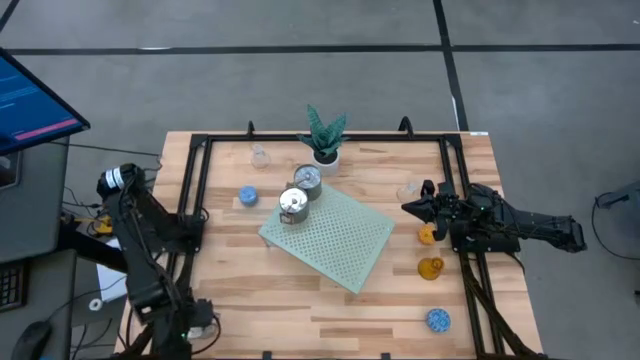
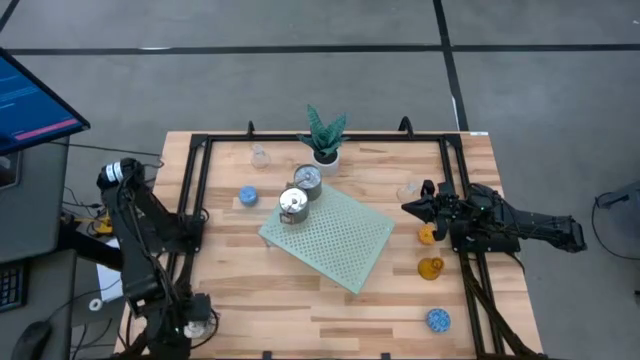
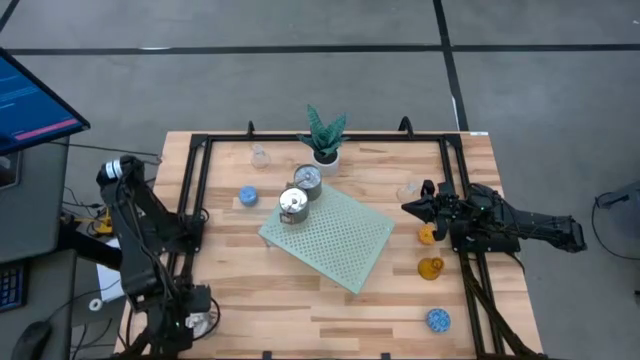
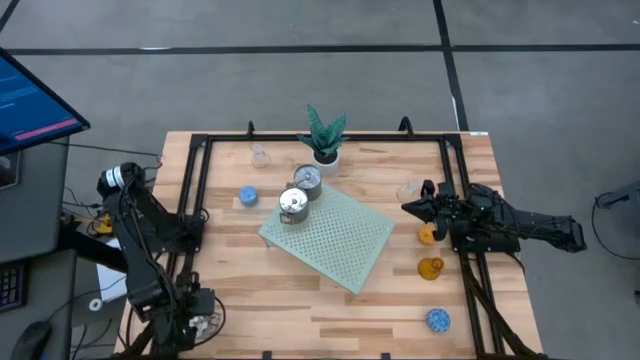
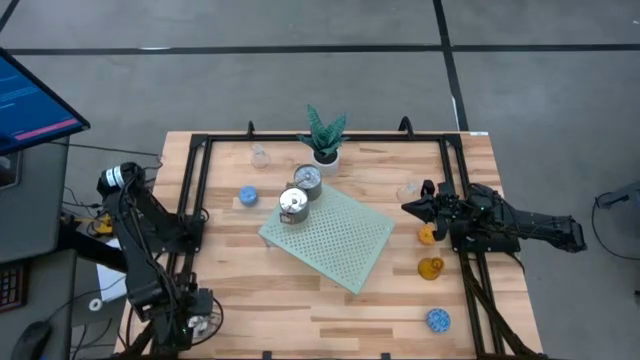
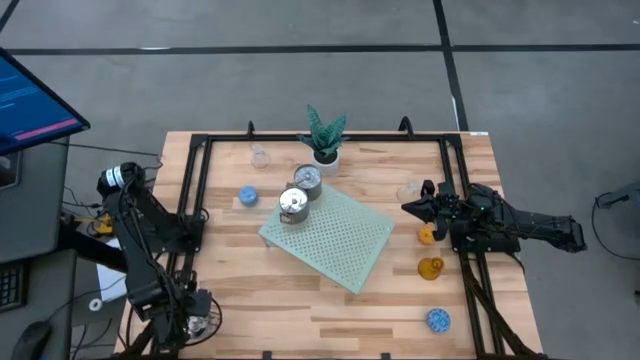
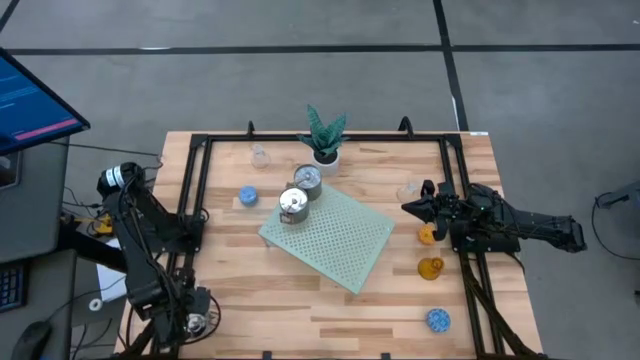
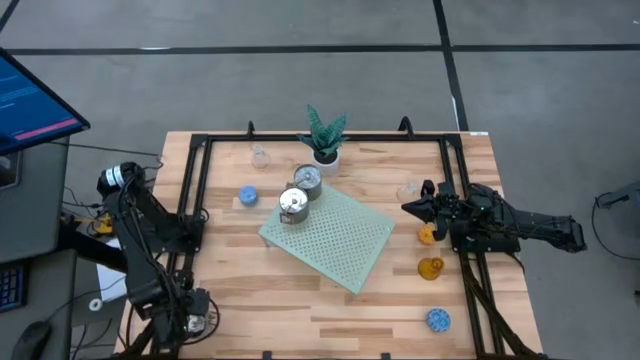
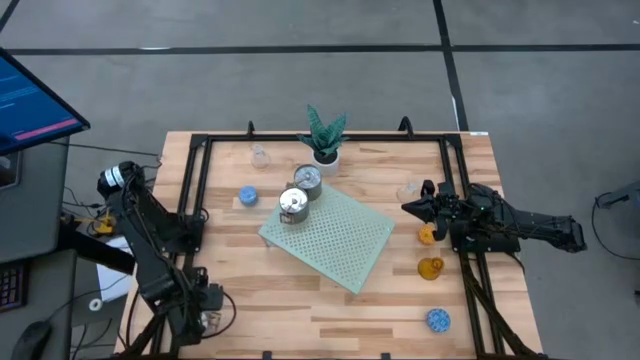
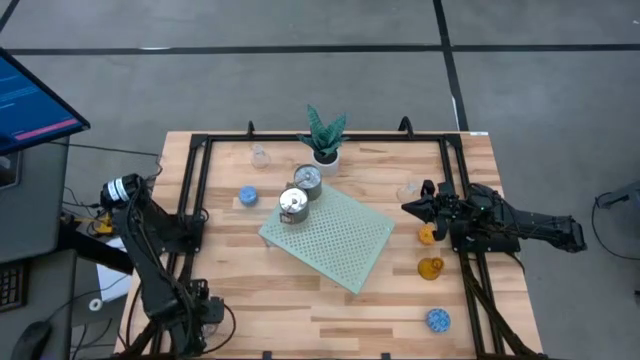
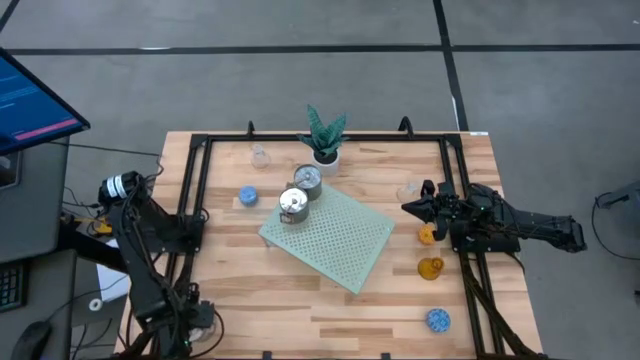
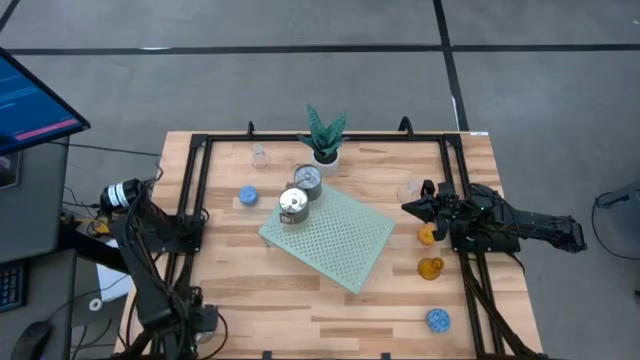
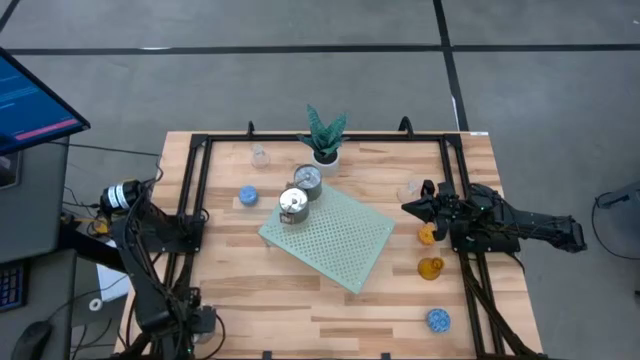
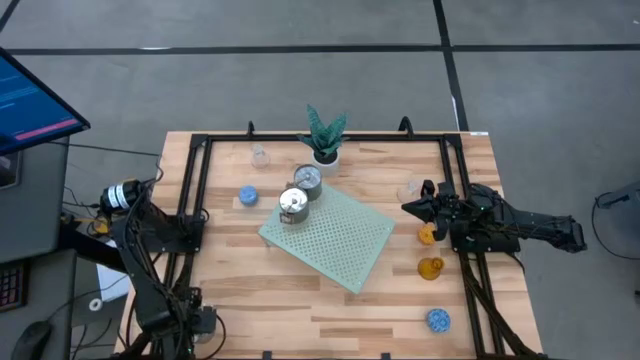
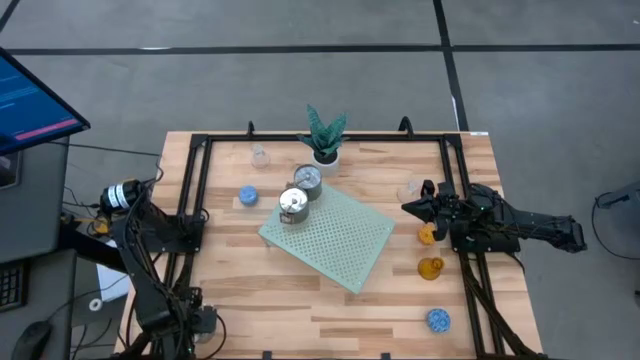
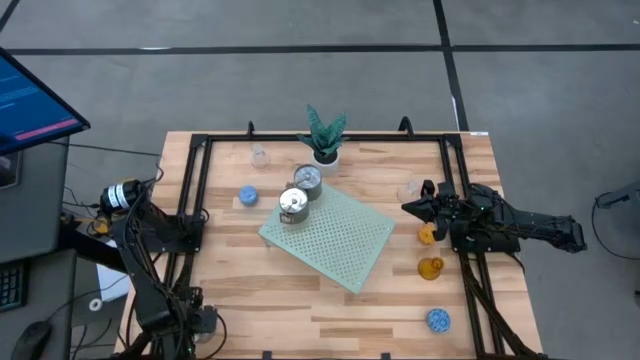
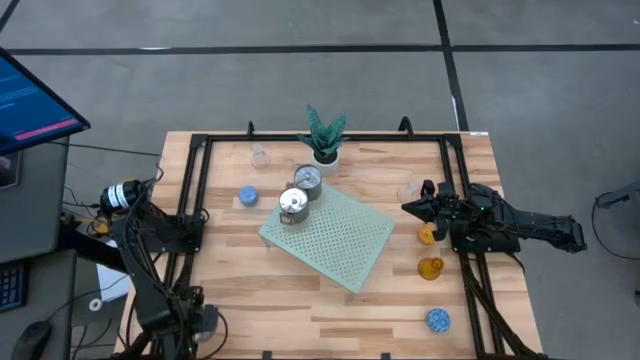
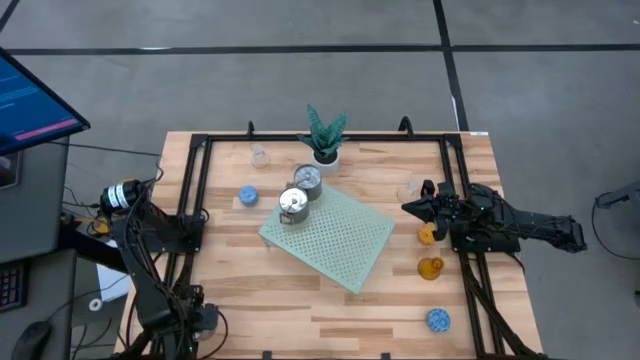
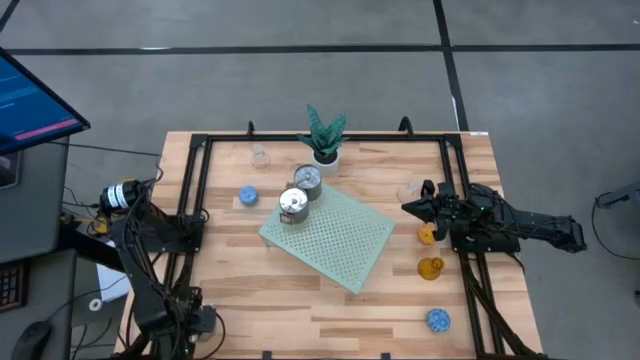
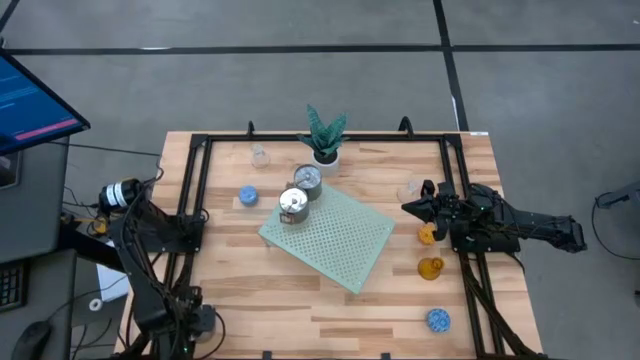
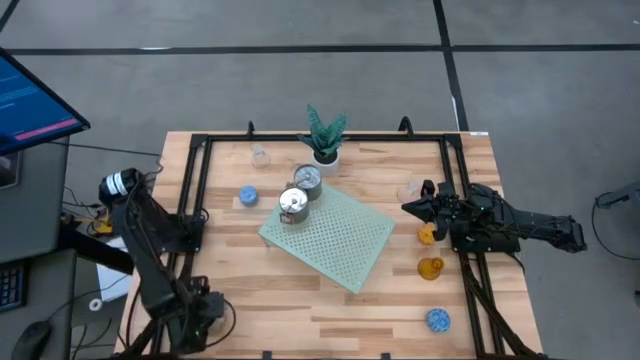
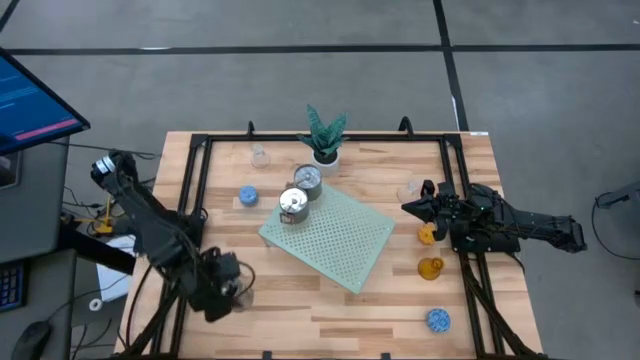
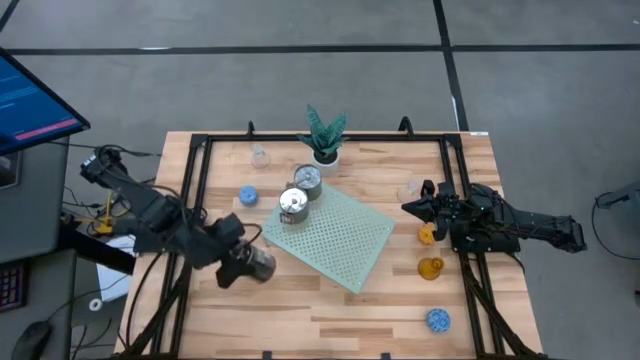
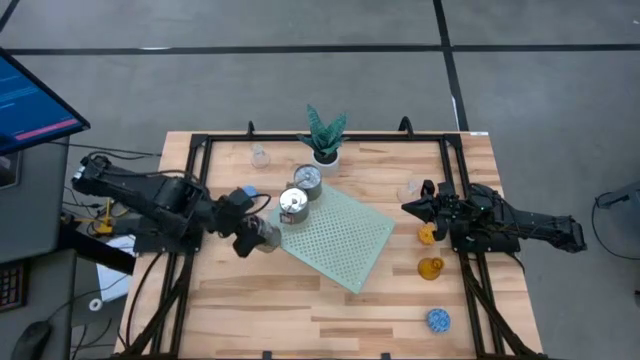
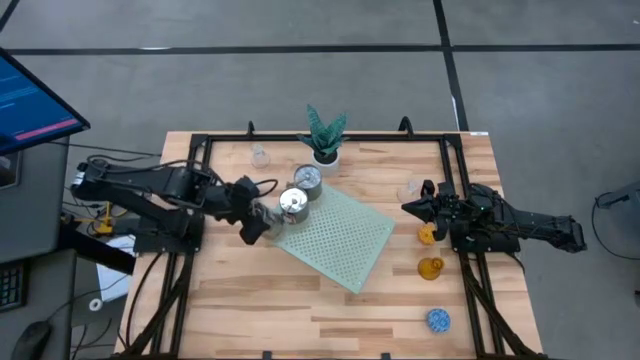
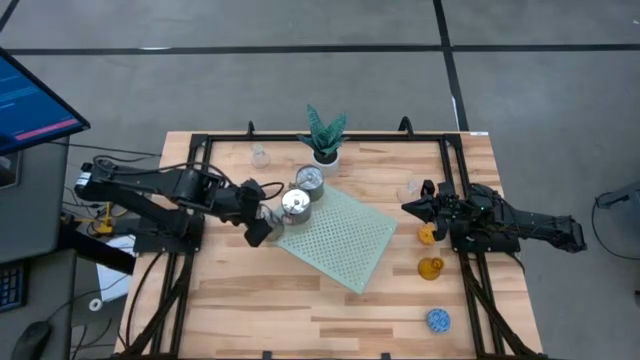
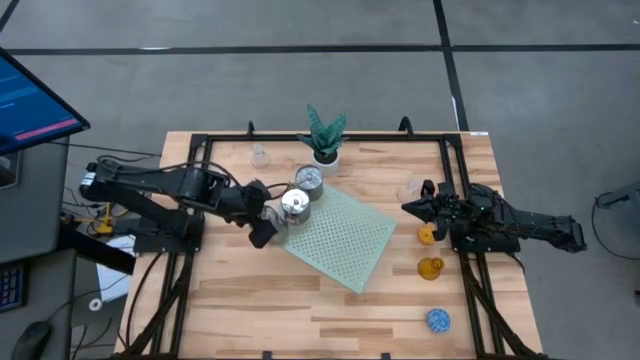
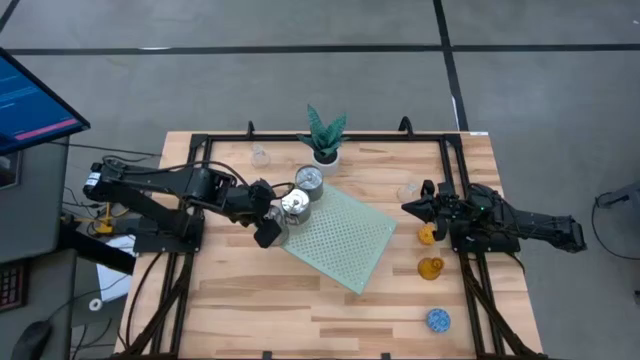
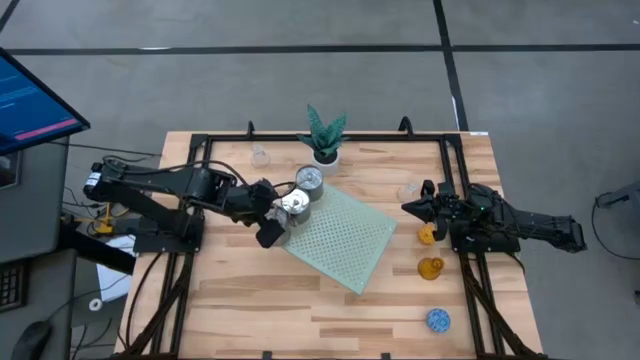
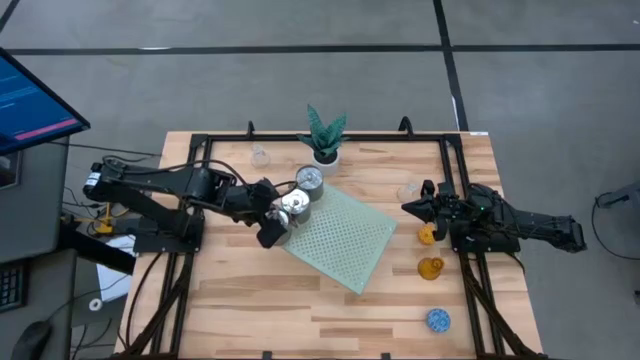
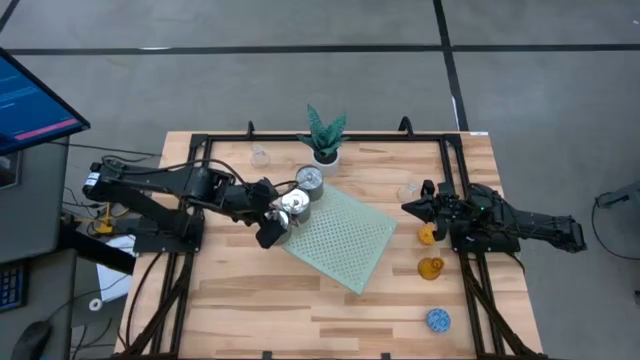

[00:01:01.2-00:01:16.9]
Task: Pick & Place candle stick holders
Put the silver scented candle on the shelf

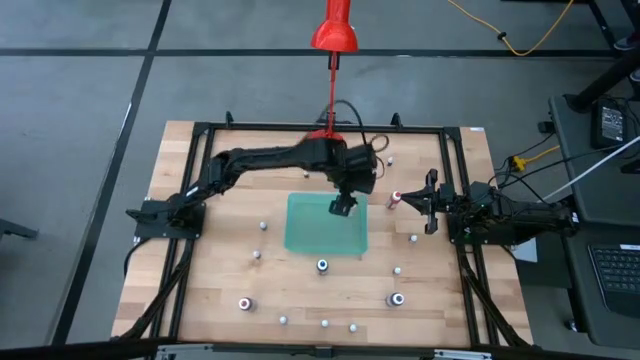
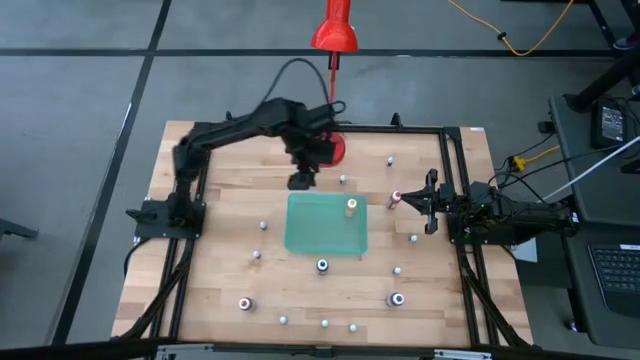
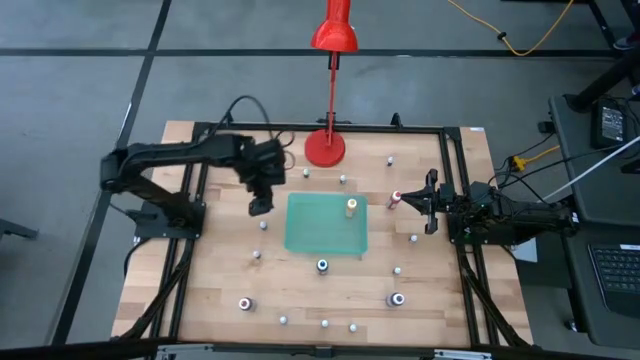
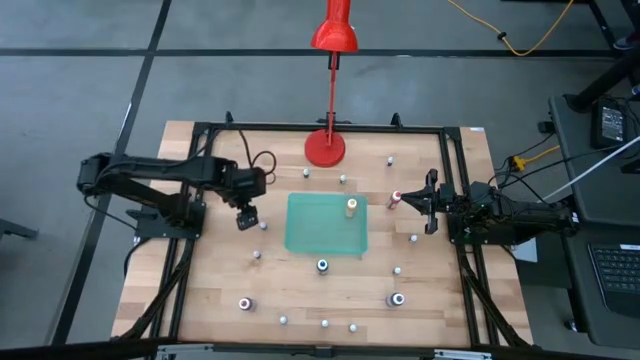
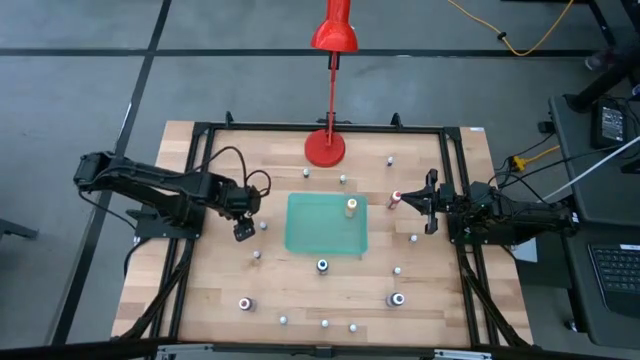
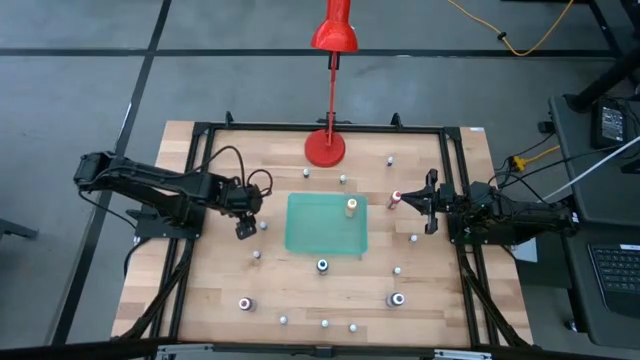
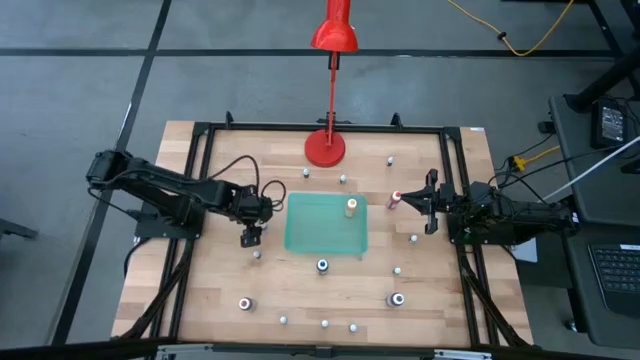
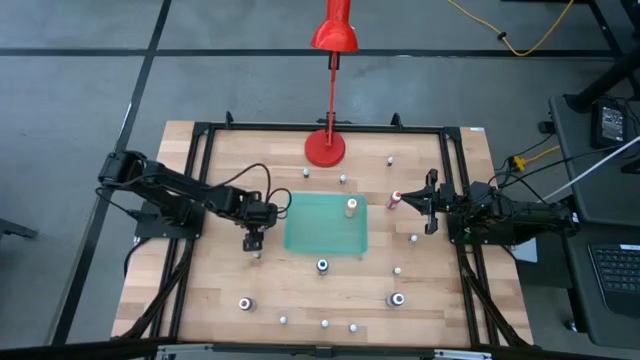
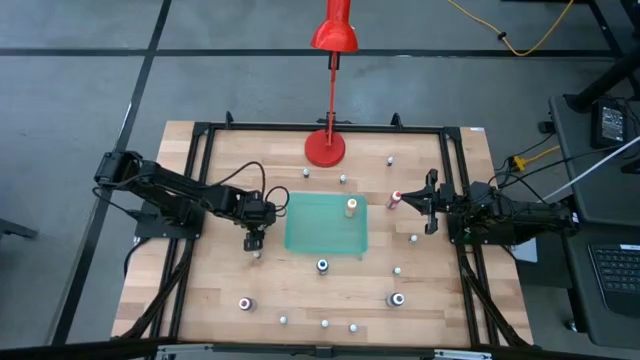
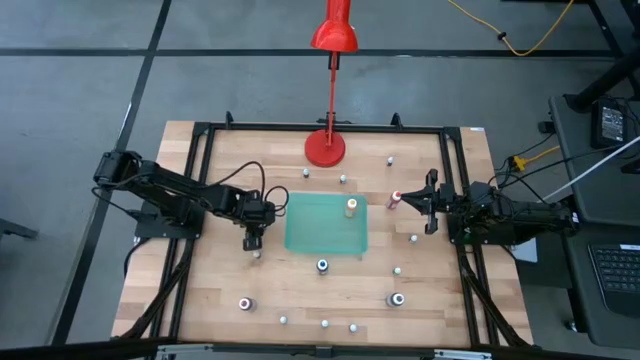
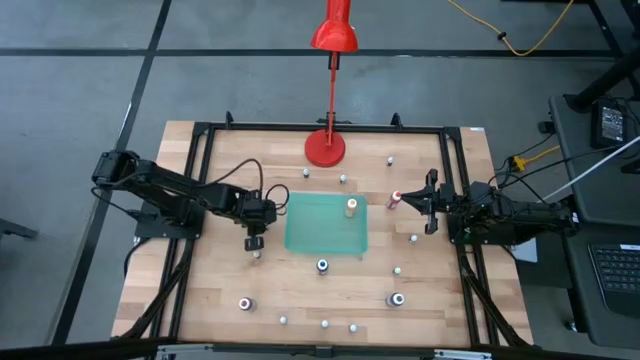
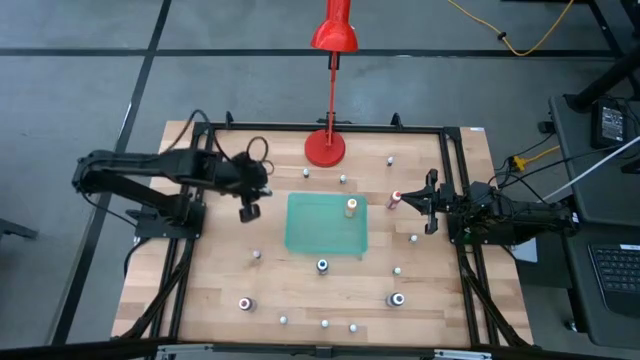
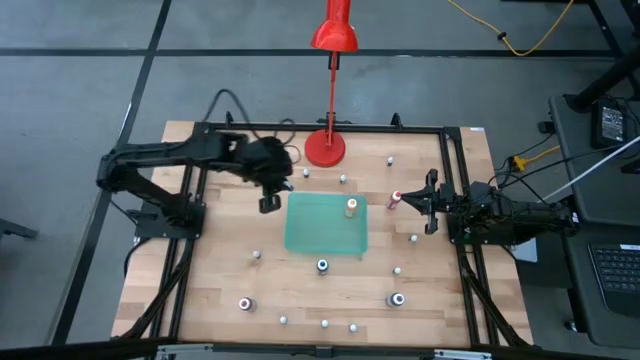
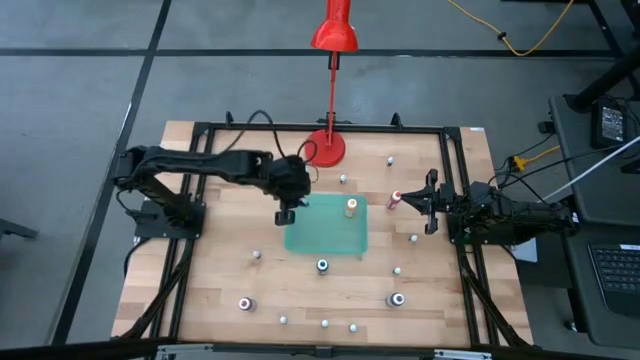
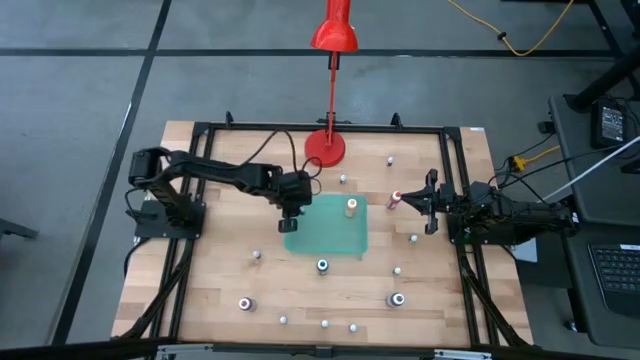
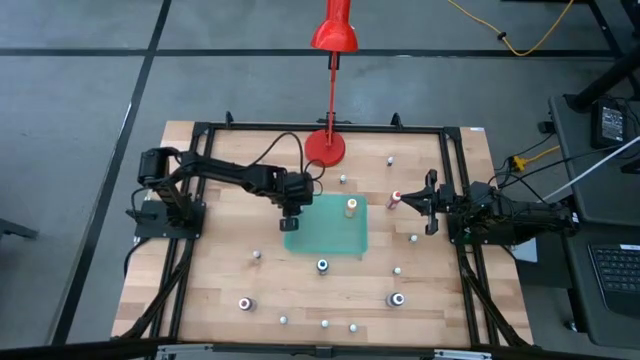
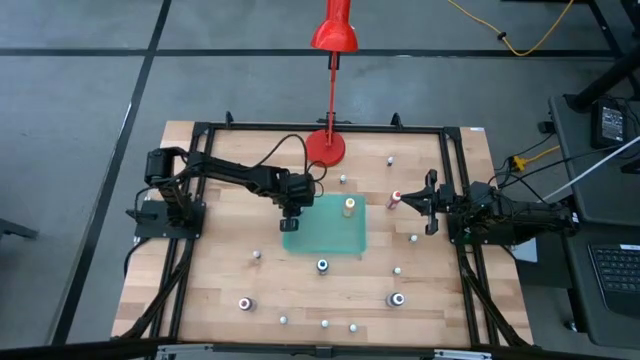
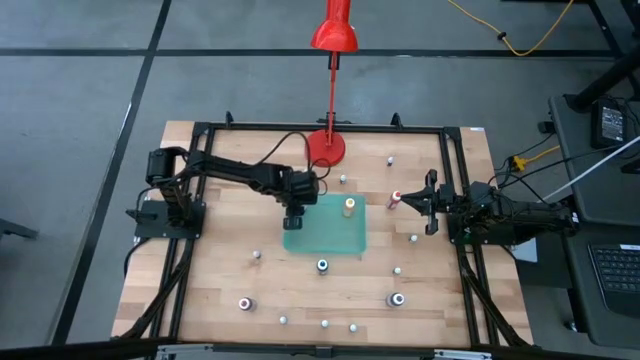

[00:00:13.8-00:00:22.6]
Task: Pick & Place food coloring
Put the bottom small blue food coloring bottle into the green bin
